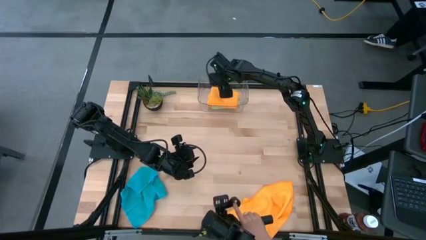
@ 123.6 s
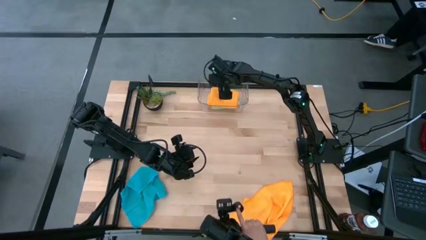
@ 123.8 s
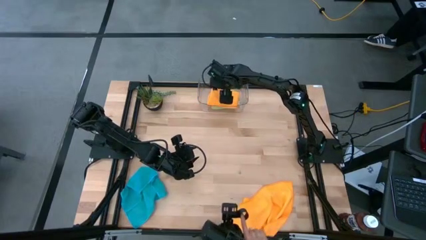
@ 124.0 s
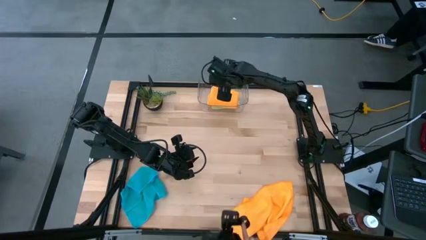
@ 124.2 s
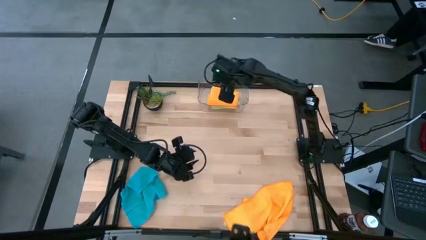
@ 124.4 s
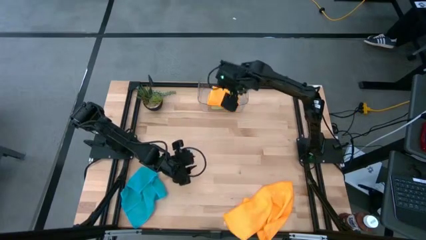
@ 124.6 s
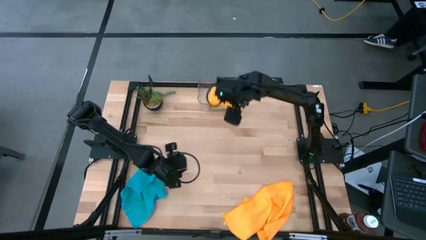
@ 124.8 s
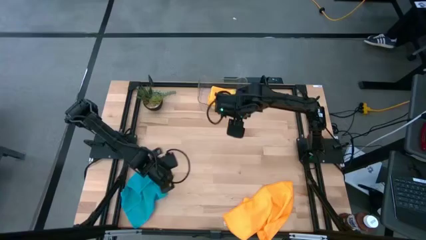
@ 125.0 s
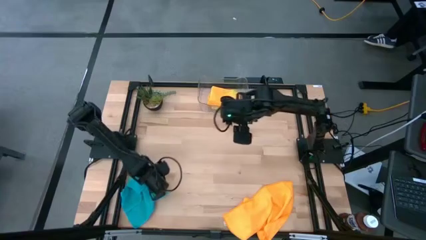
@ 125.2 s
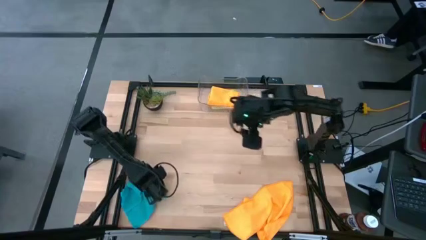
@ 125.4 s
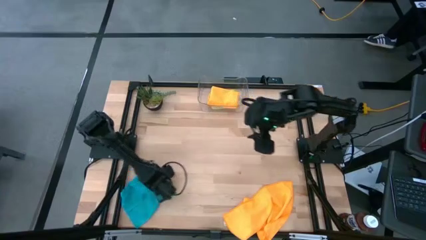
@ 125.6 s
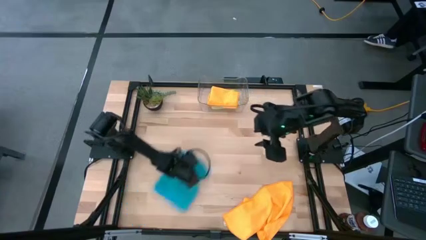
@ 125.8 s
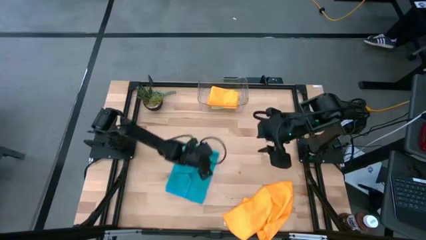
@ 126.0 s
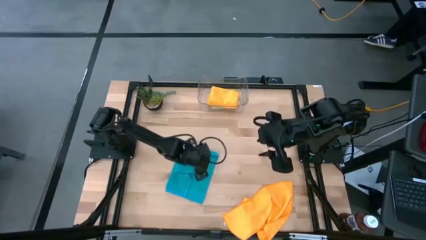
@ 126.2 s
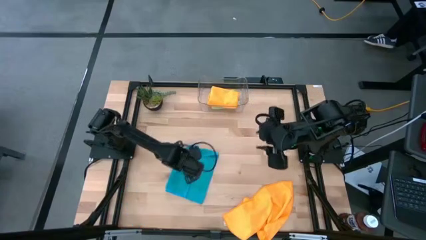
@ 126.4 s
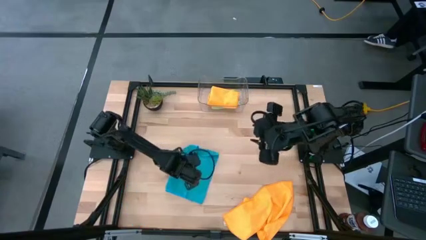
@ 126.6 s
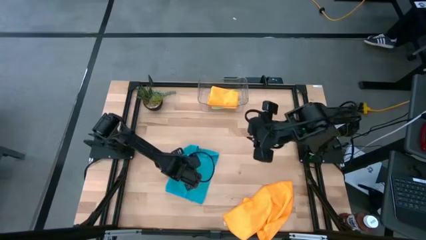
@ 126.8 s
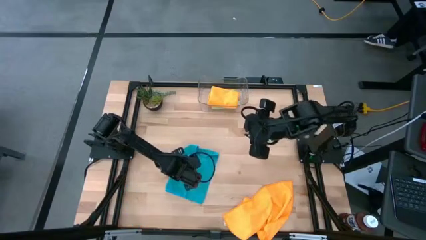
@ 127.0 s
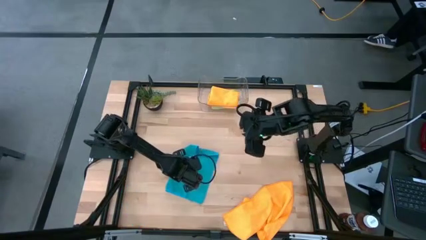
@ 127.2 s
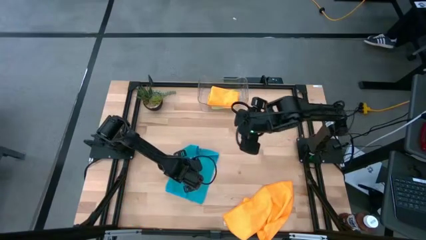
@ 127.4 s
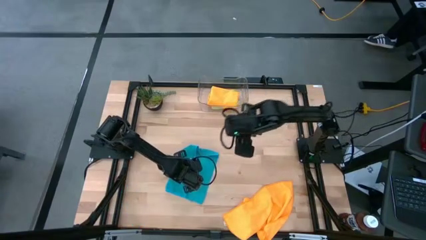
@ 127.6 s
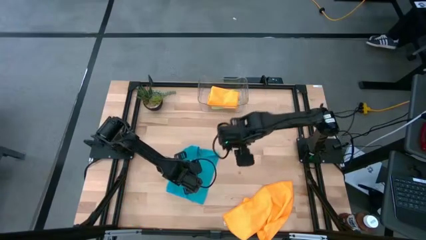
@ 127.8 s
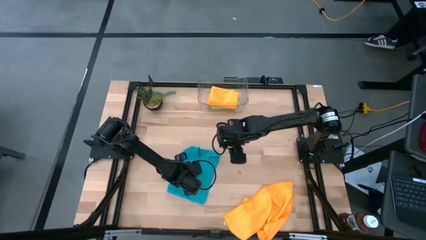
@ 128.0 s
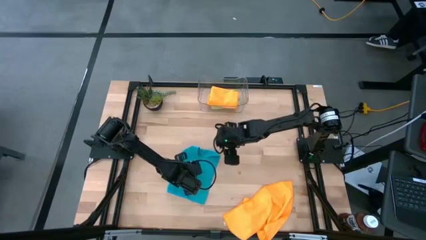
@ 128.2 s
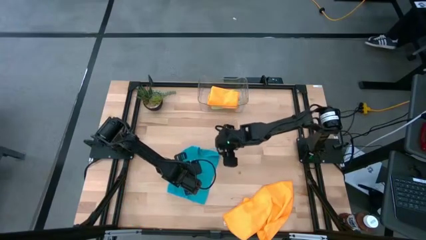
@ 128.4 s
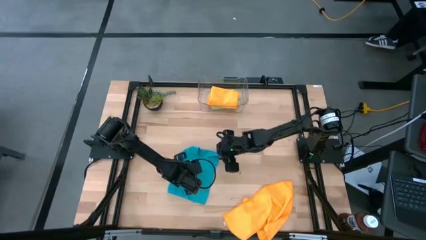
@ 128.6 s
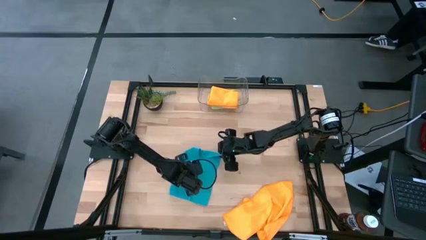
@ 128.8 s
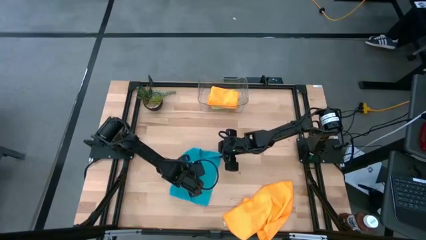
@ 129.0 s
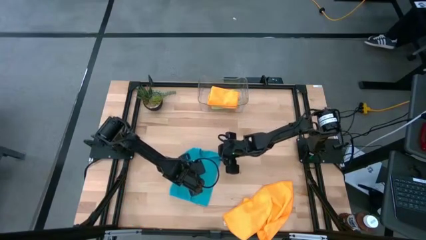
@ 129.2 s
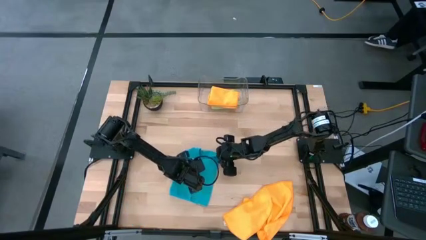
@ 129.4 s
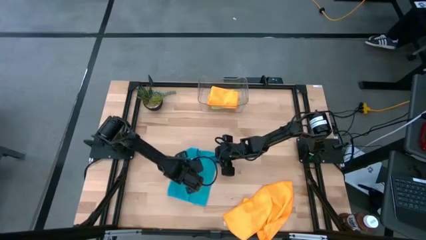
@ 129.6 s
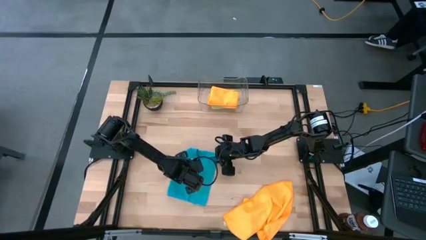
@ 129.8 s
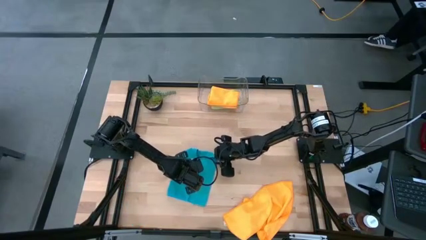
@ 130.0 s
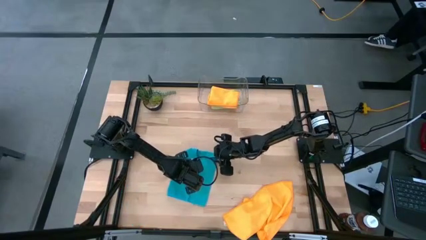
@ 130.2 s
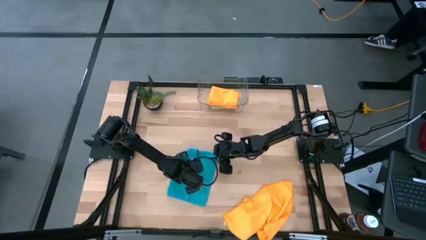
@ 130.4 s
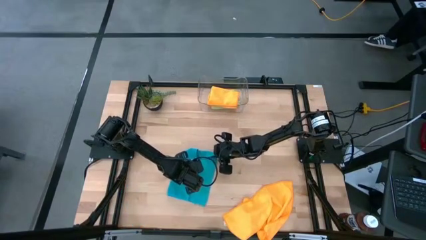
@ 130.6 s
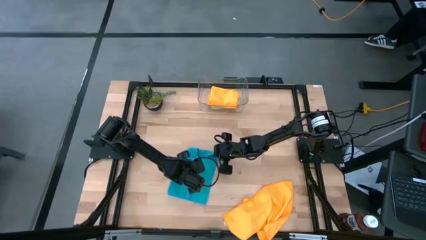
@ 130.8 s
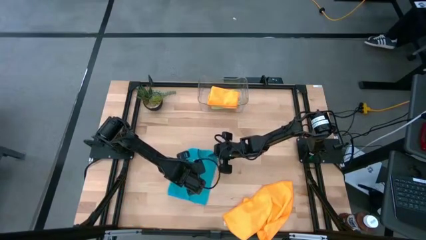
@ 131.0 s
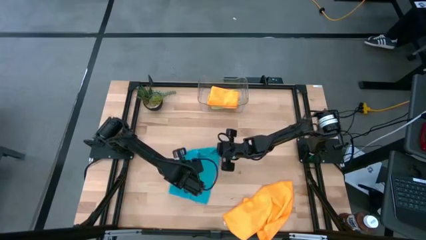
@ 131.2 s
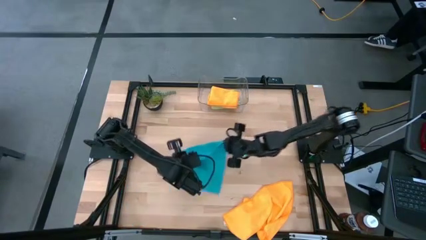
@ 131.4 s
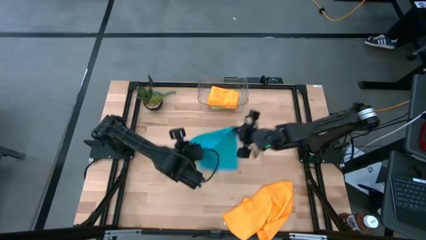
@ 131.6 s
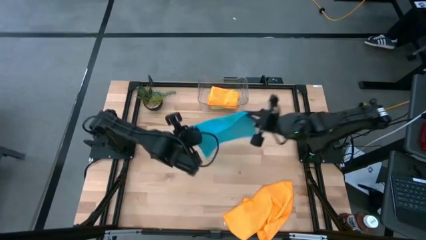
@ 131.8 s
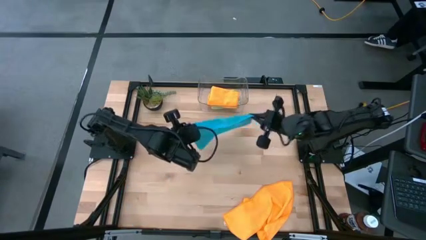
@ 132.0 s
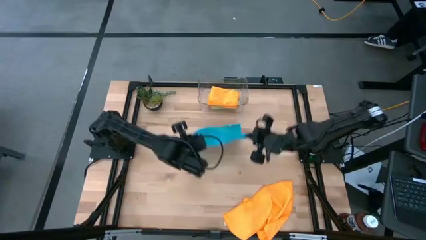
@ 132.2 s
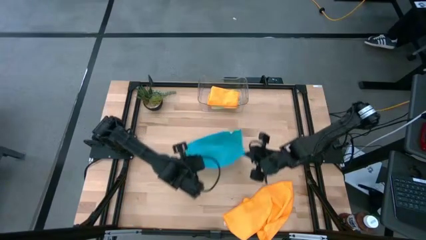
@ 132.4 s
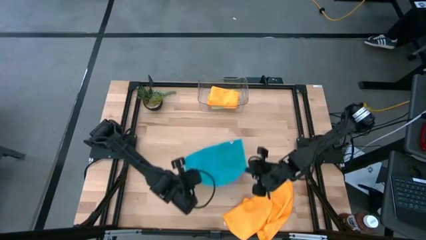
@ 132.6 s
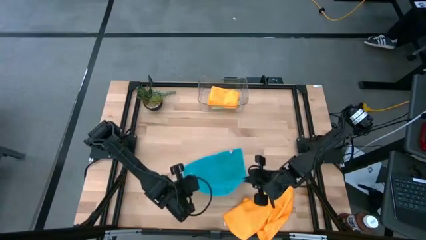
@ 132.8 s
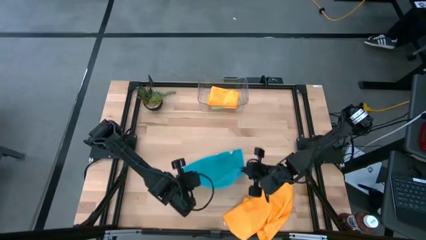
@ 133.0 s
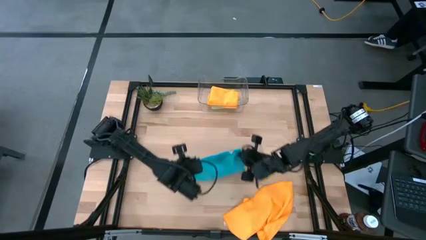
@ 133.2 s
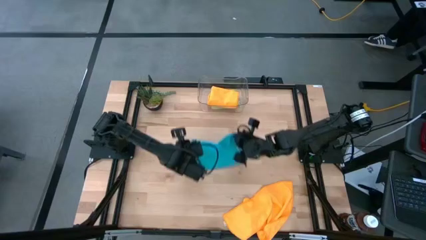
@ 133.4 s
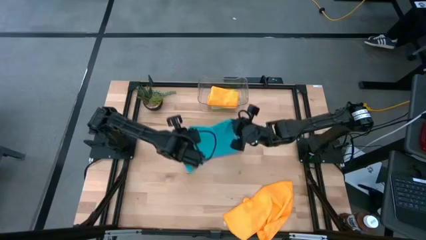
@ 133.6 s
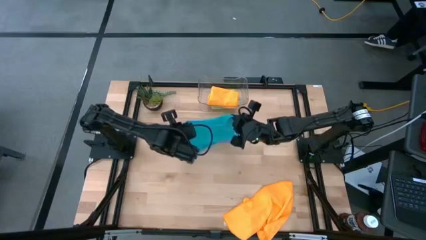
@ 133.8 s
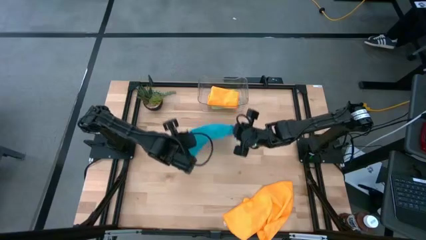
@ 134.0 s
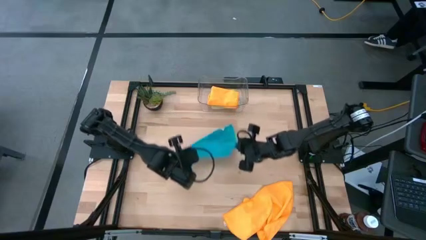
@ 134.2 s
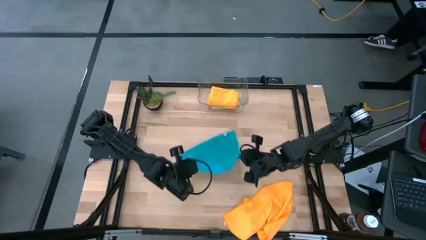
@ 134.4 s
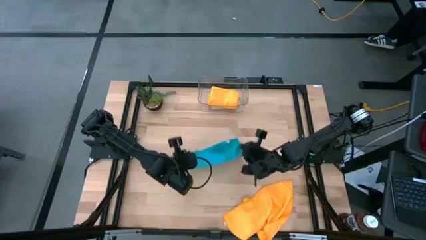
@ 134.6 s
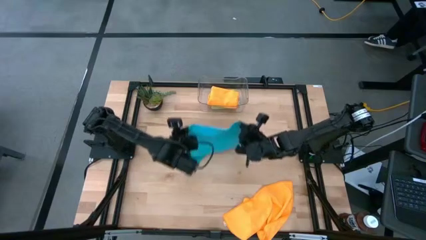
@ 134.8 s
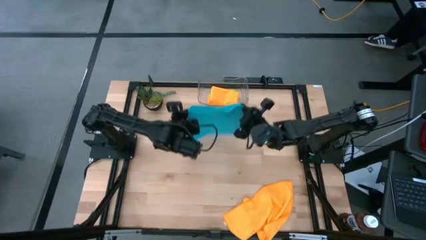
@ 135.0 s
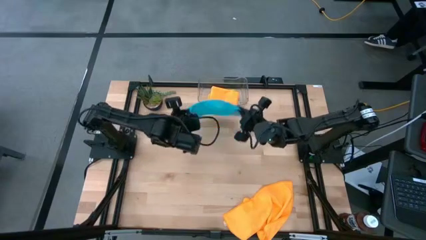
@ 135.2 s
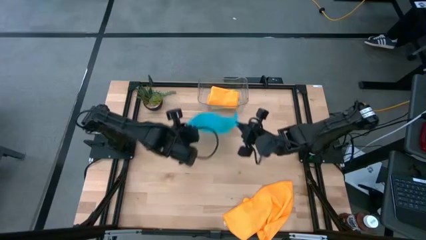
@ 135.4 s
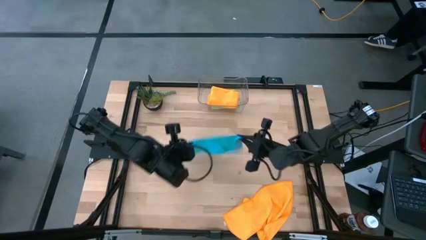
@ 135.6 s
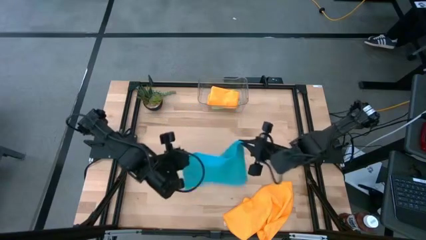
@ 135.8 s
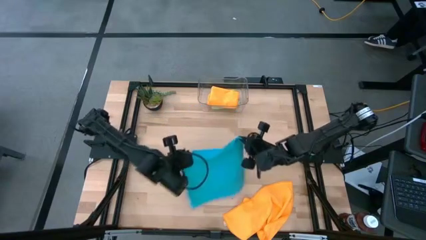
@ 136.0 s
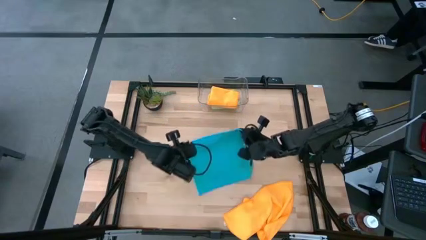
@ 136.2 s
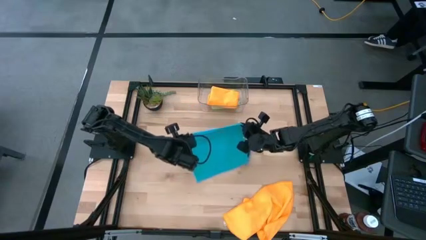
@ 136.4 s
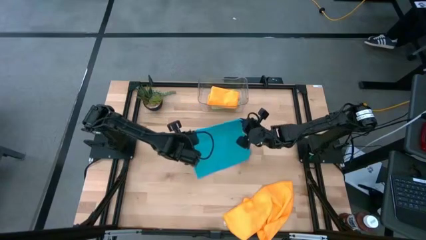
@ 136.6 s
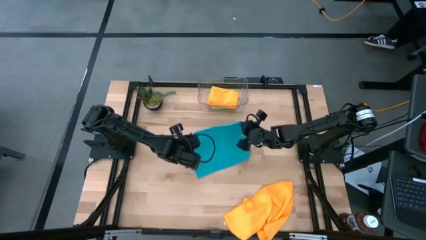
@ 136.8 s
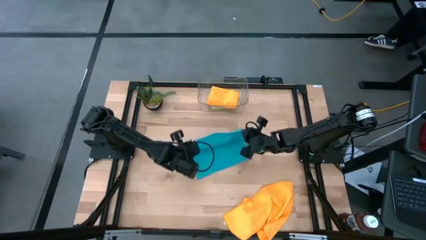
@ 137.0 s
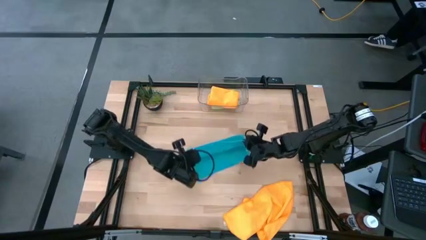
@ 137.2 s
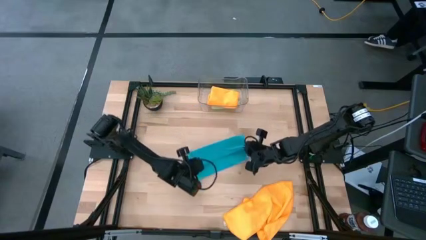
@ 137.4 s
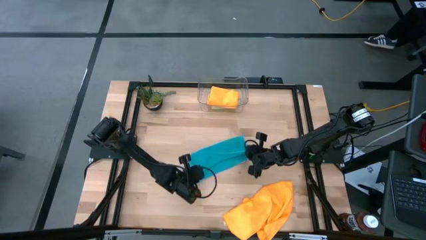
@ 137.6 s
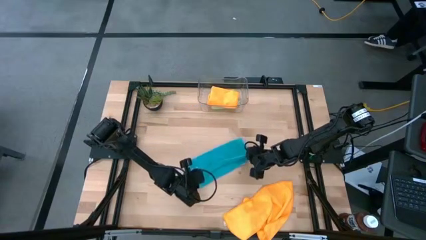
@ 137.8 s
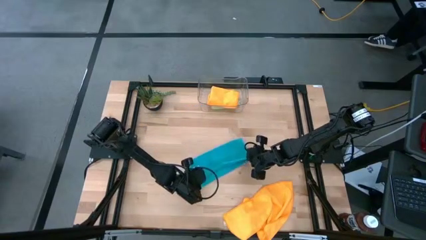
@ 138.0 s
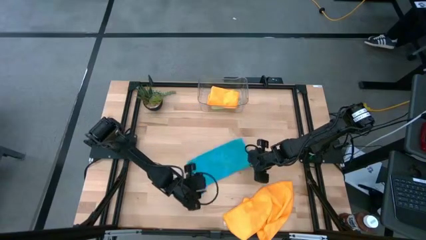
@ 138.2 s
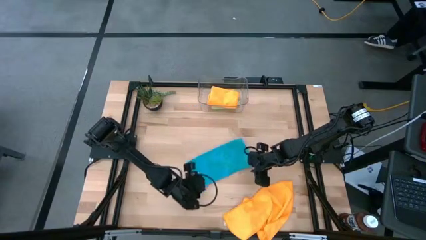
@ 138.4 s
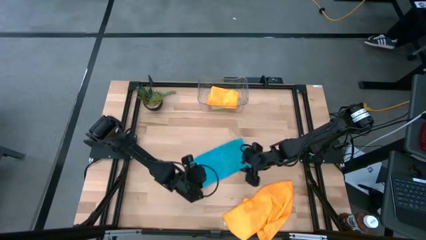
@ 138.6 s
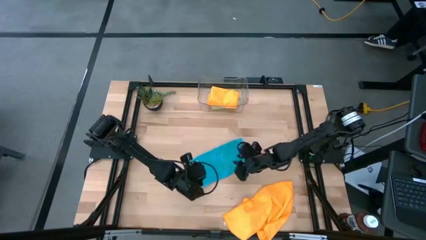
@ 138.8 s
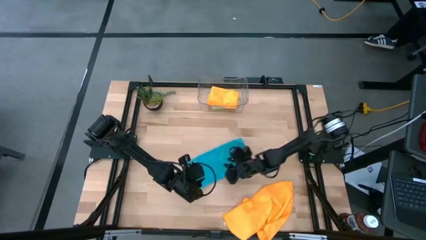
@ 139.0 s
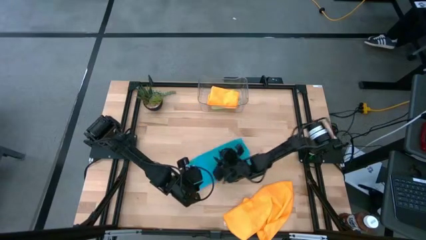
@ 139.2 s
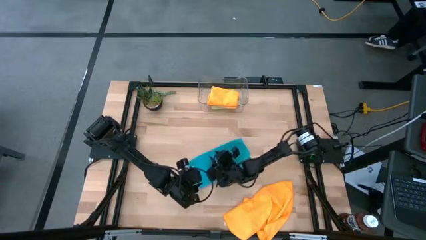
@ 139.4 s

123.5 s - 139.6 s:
Task: Fold microfiber towels
Fold the blue microfiber cloth
